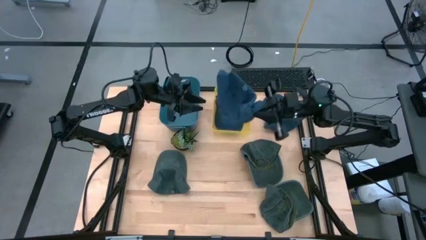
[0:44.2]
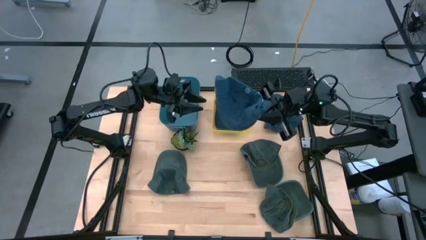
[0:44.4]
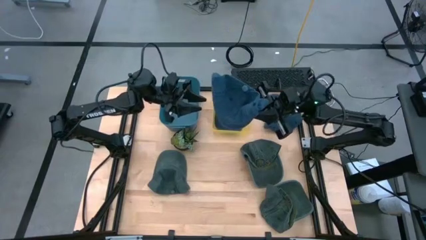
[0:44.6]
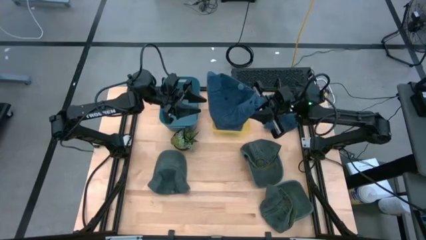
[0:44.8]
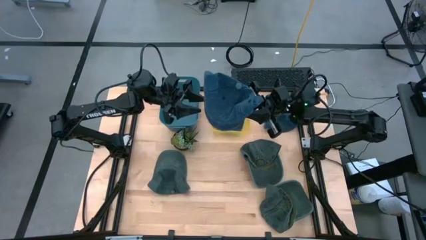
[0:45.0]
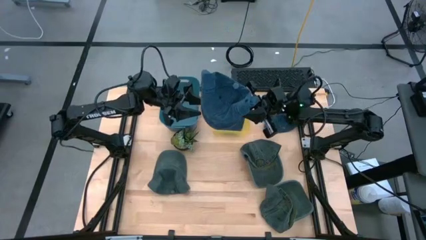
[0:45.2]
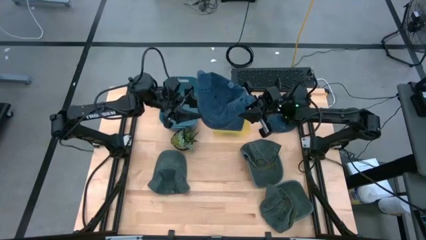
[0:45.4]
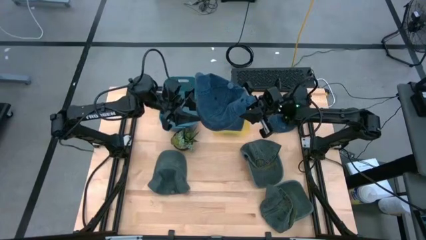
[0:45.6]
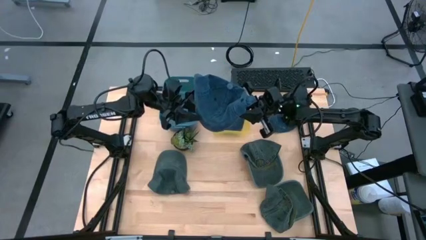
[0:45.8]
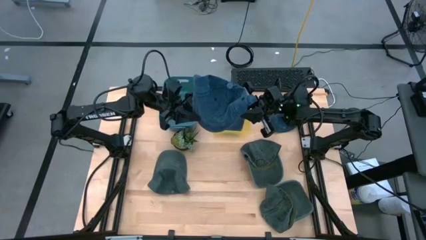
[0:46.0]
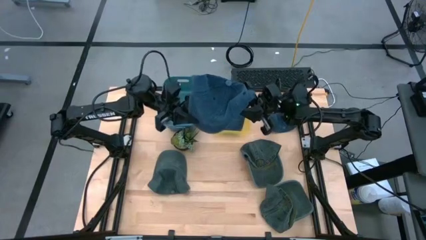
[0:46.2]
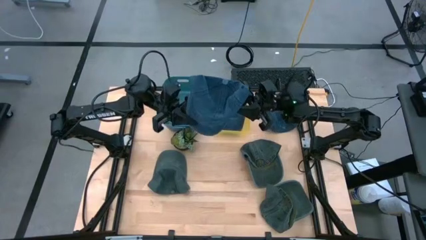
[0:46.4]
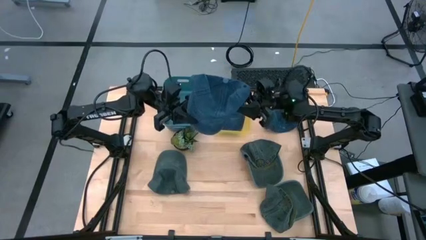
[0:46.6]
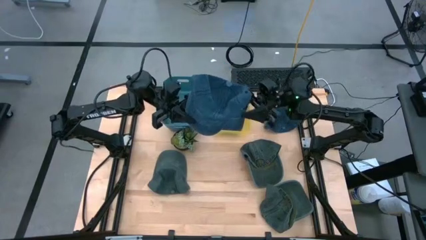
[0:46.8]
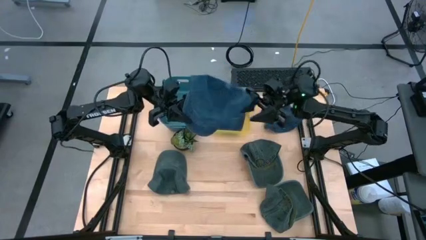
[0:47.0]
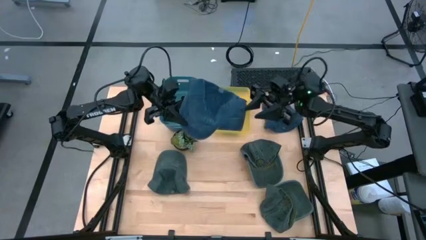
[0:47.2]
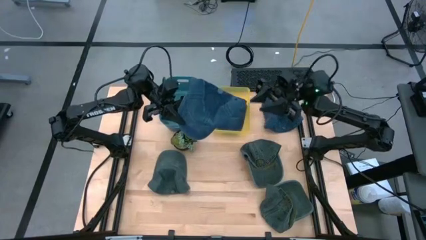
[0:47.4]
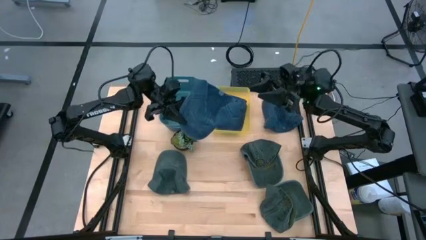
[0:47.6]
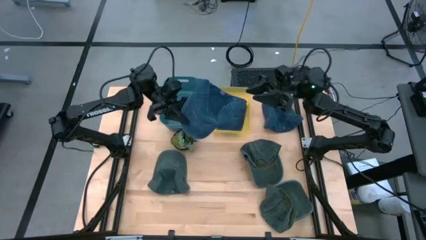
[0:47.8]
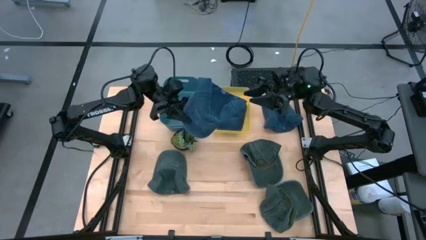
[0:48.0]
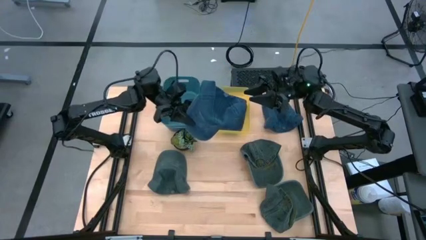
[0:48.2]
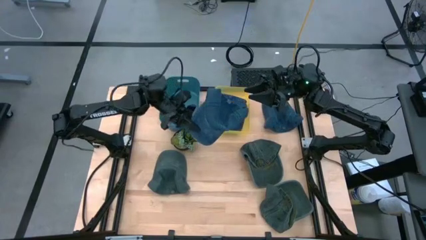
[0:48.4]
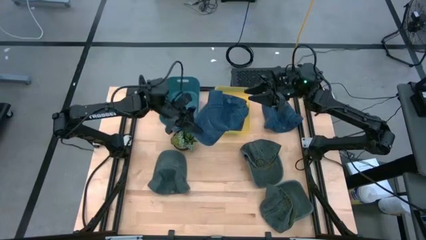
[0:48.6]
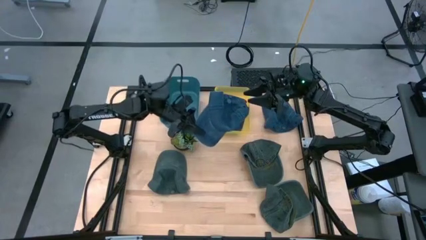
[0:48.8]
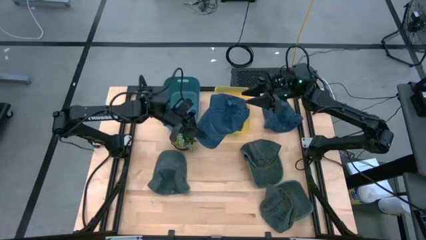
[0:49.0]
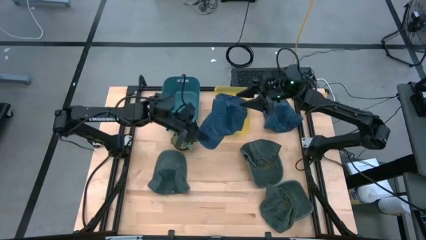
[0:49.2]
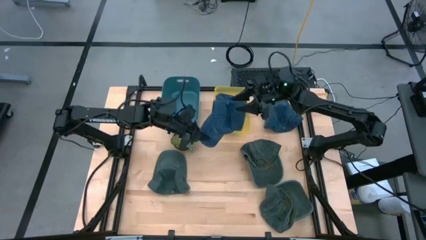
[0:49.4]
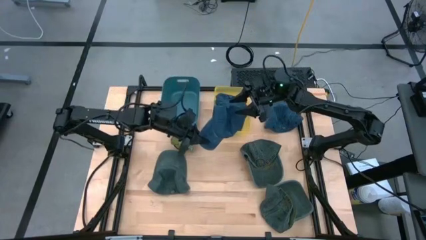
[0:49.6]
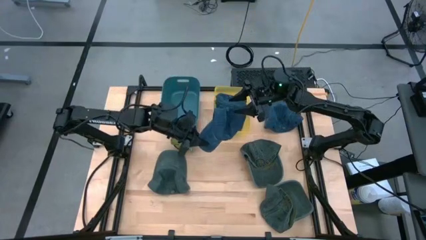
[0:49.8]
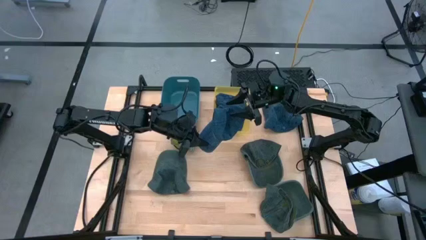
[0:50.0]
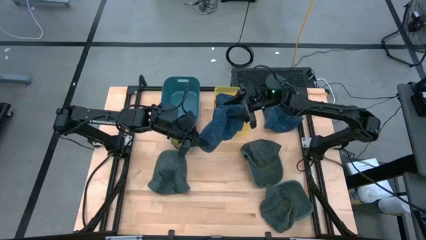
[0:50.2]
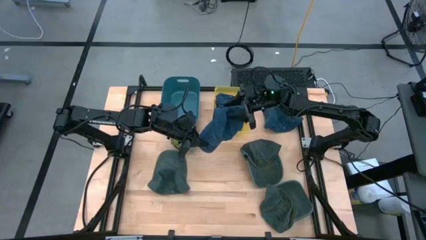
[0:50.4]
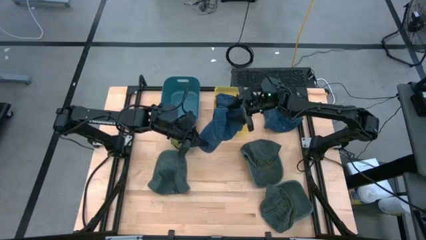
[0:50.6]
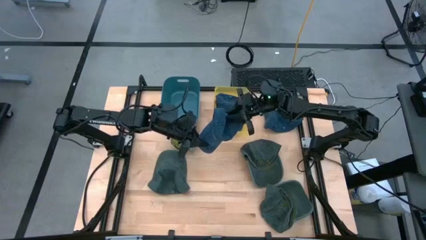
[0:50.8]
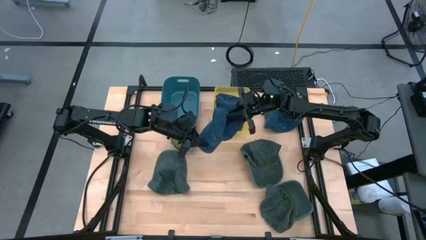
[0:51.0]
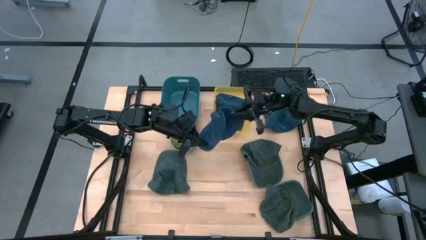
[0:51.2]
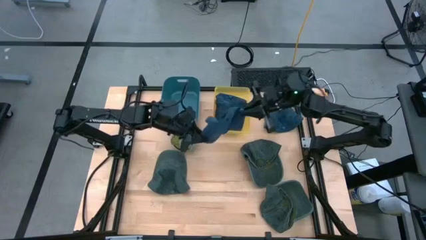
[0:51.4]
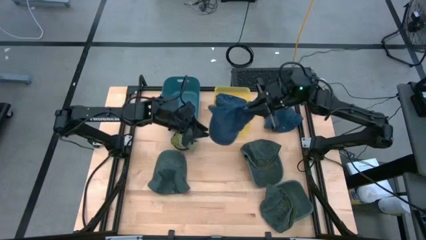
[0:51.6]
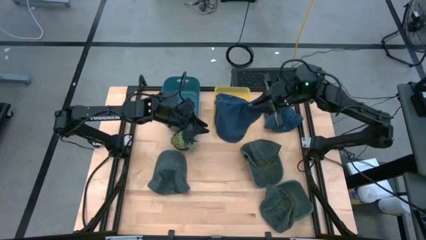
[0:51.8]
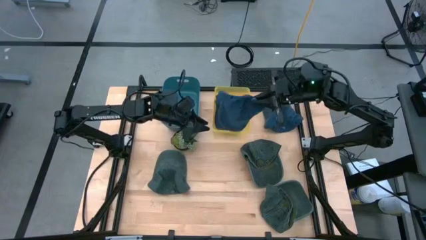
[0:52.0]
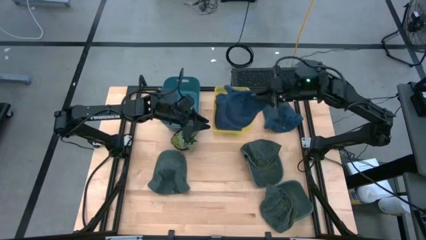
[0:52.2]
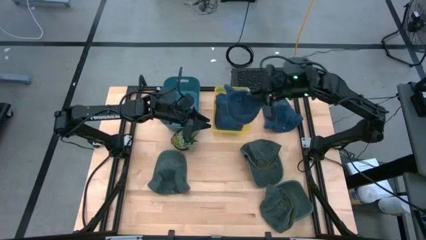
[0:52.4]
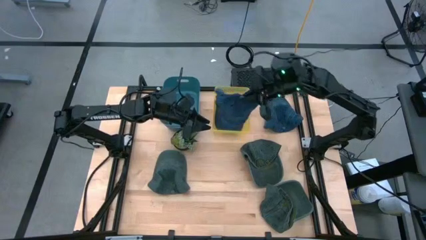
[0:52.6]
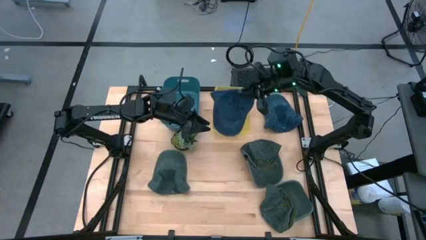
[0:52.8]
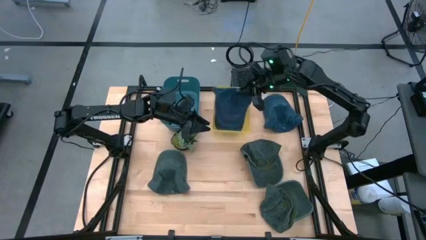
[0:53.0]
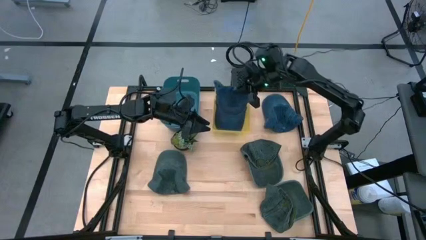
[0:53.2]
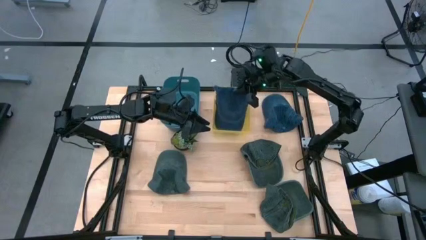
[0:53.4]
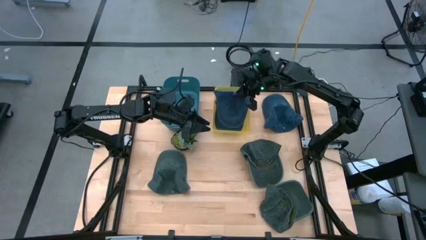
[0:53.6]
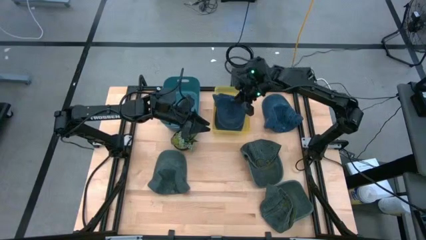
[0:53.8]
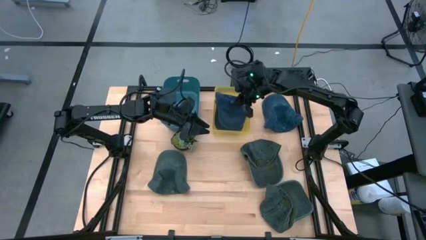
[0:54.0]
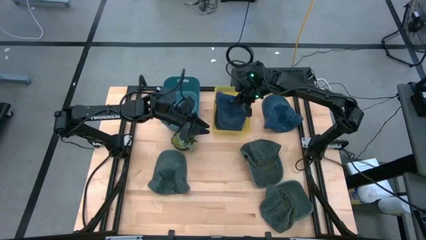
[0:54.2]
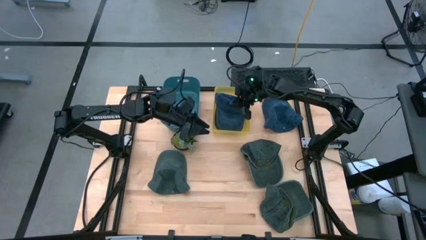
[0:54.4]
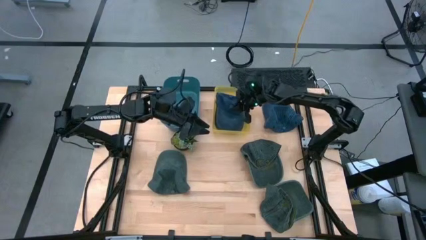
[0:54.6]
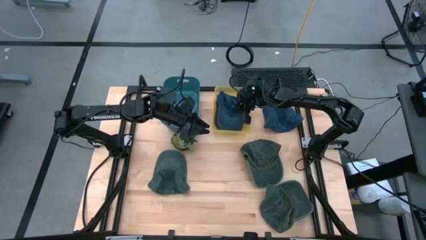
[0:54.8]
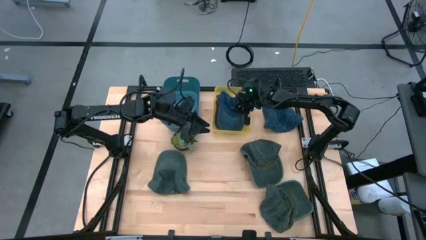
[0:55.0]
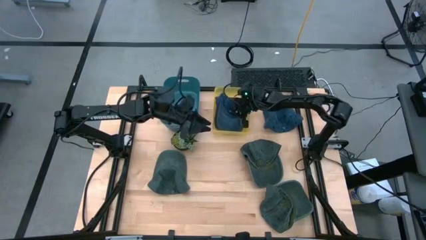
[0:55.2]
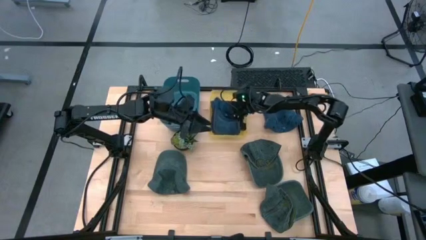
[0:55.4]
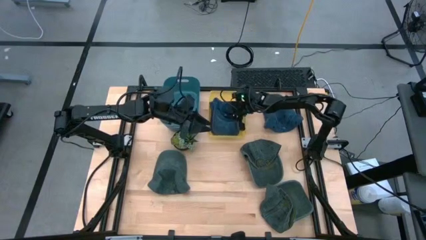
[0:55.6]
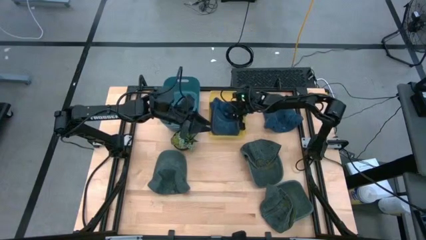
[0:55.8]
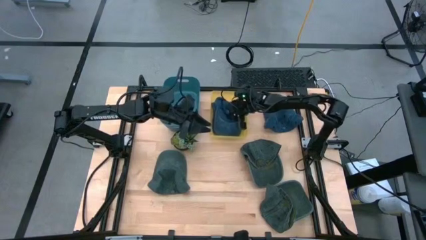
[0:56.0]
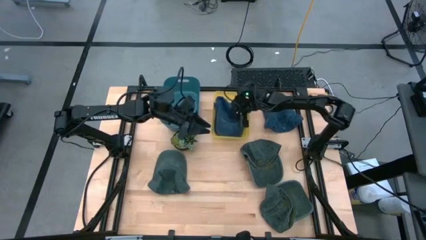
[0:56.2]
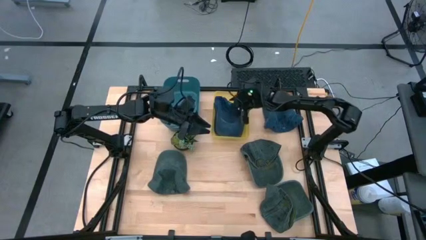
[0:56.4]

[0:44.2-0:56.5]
Task: Pick & Place hat
Put the bottom blue cap into the yellow bin
